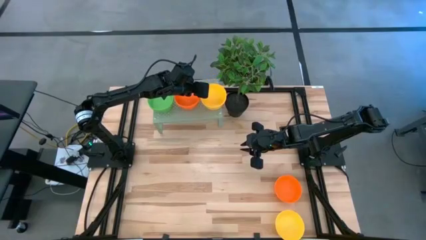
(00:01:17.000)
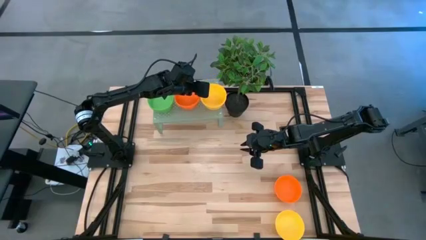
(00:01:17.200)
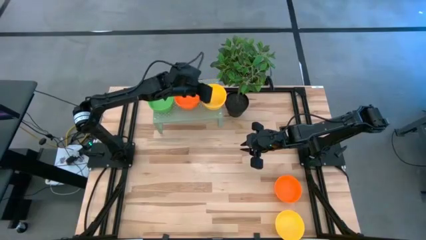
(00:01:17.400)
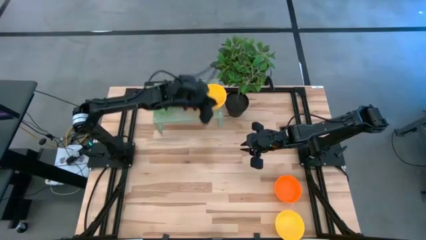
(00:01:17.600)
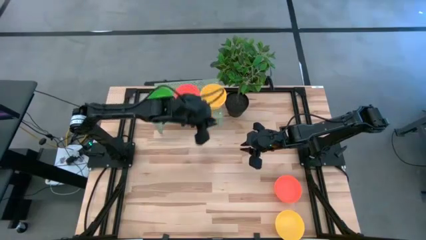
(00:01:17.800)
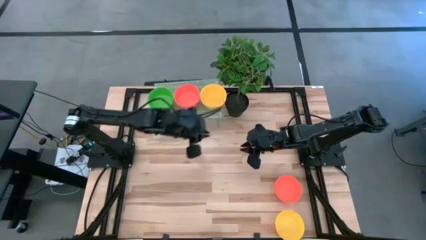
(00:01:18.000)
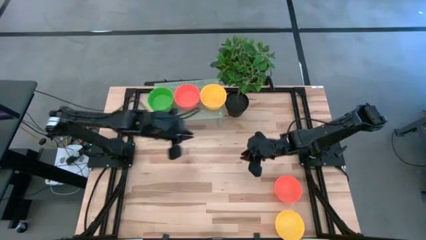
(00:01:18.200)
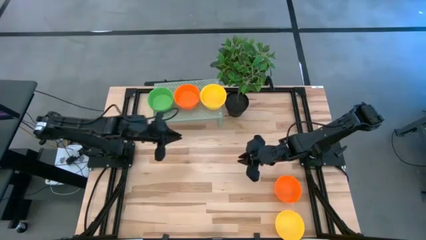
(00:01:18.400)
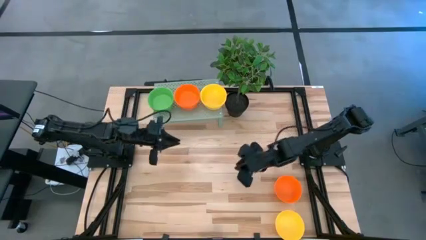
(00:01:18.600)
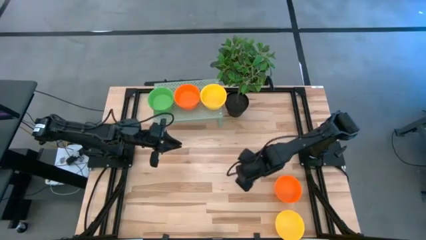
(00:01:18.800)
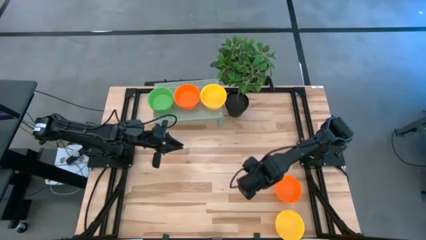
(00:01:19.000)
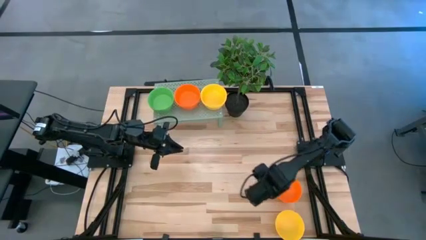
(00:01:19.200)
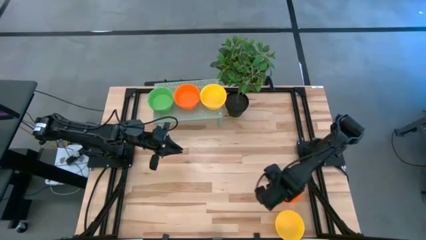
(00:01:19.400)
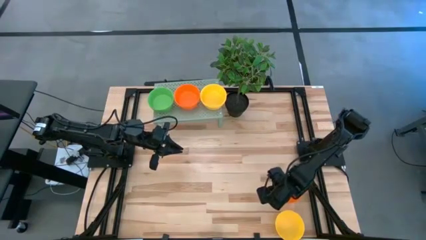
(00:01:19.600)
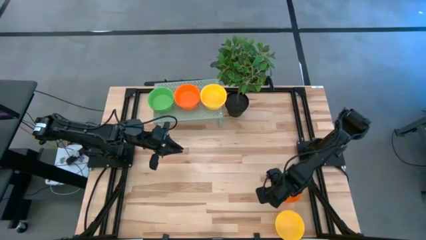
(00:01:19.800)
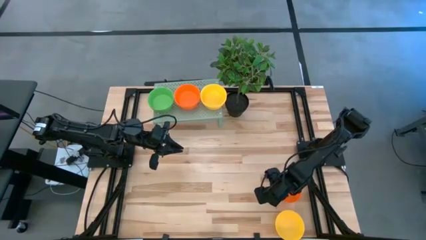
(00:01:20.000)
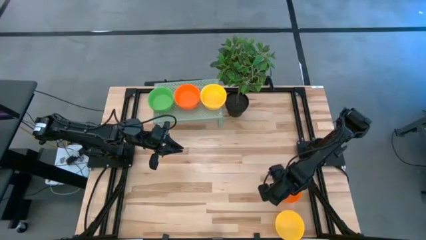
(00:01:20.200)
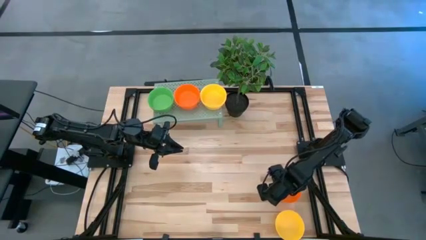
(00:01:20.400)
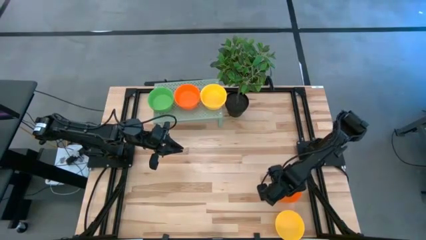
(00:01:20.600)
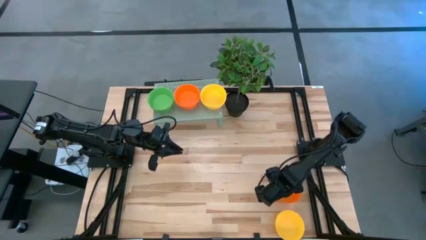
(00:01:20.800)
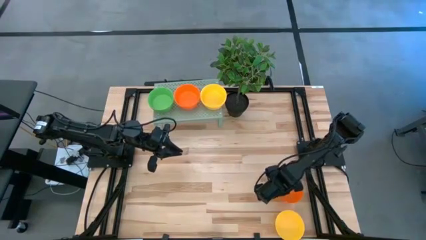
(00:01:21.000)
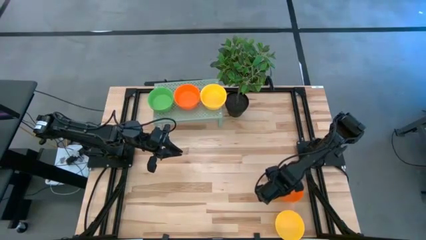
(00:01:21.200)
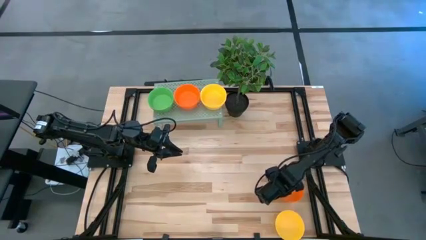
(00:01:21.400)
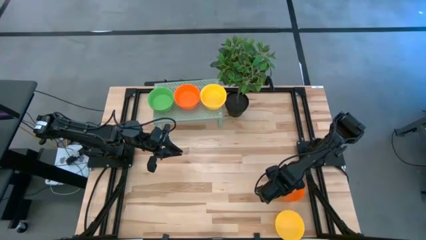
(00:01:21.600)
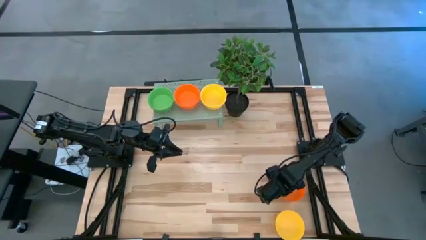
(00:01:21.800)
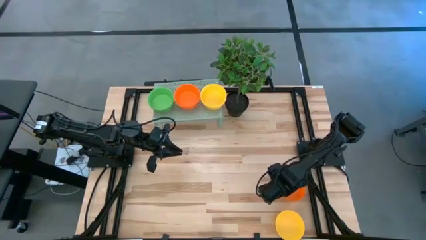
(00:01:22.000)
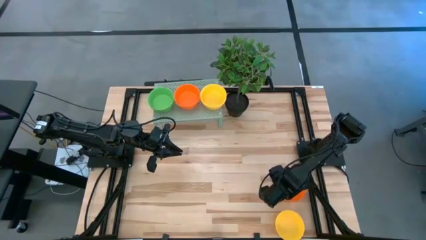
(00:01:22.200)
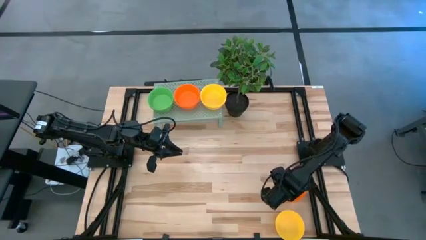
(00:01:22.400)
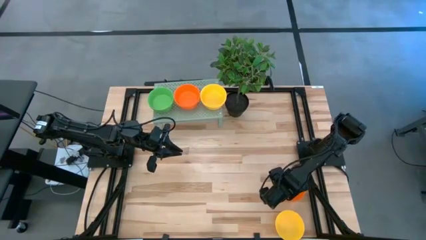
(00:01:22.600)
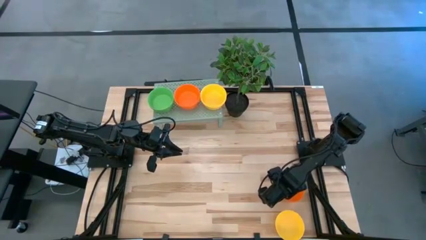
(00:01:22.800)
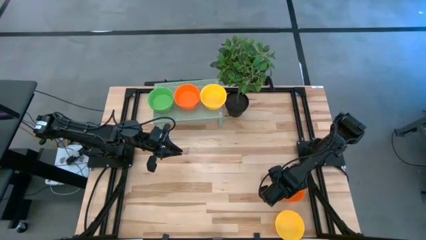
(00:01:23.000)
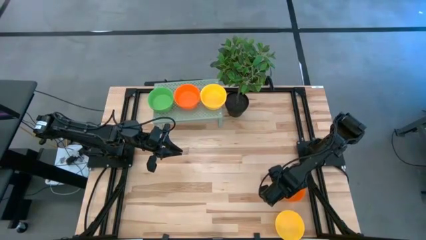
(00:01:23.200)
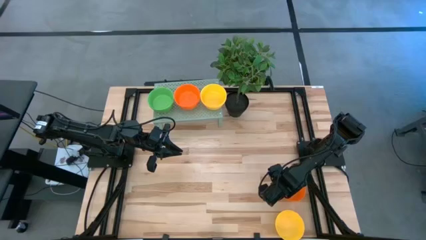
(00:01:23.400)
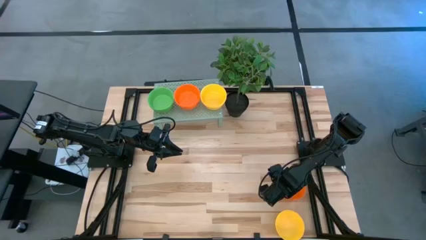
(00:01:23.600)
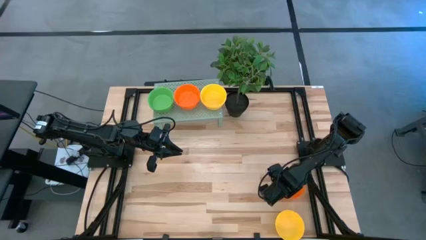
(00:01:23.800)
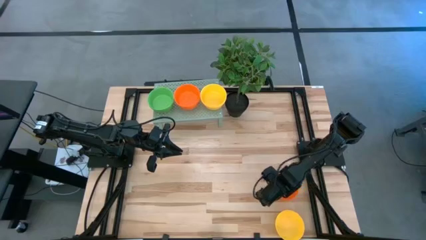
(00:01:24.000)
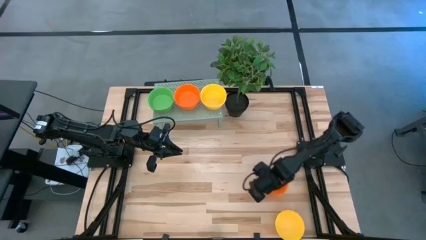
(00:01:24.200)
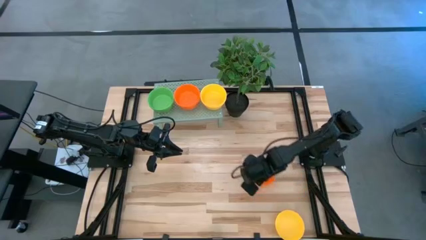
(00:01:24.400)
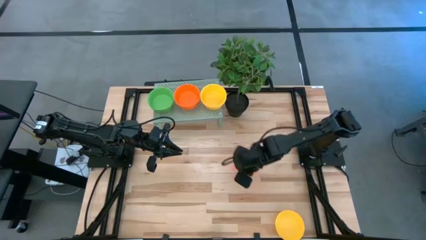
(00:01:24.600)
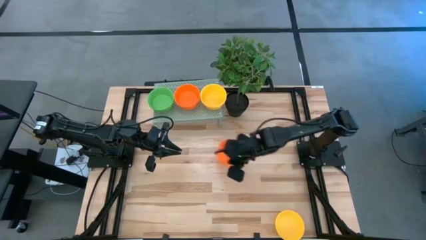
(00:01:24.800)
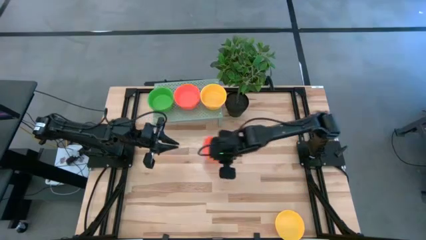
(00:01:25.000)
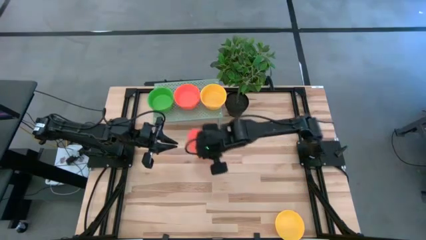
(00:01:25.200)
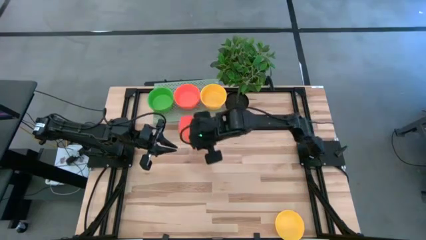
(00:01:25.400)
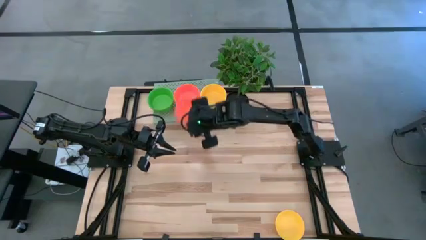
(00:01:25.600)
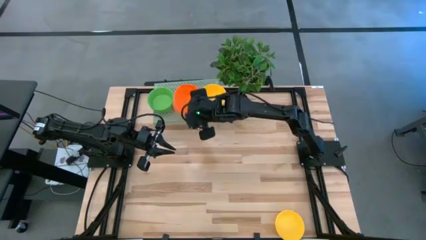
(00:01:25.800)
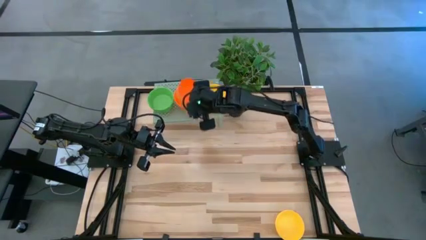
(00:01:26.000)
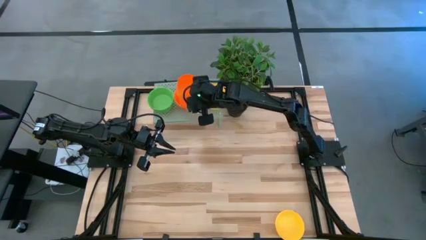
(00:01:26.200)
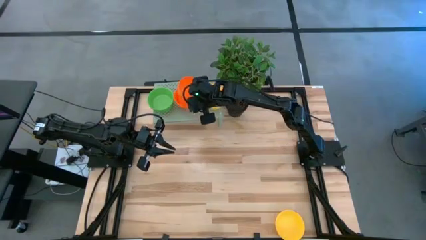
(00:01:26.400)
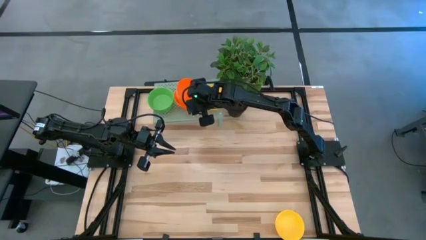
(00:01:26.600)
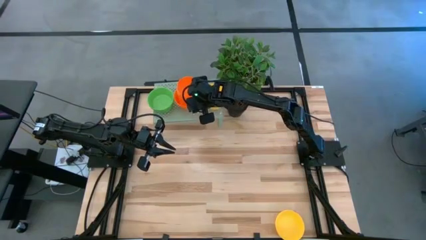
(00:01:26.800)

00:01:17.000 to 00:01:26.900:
Task: Pick & Place Mini bowls
Stack the orange bowl on the orange bowls on the shelf

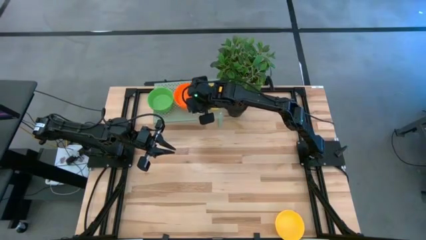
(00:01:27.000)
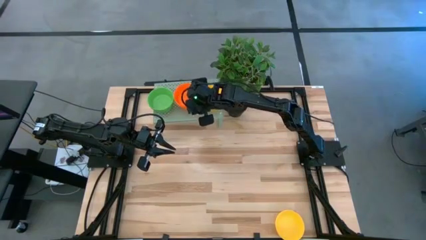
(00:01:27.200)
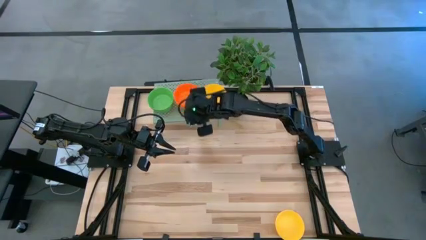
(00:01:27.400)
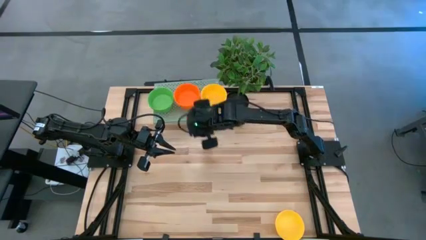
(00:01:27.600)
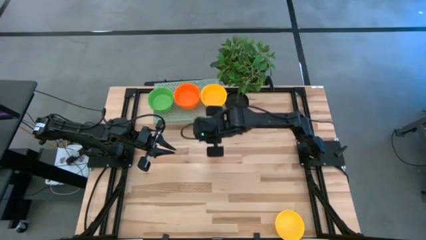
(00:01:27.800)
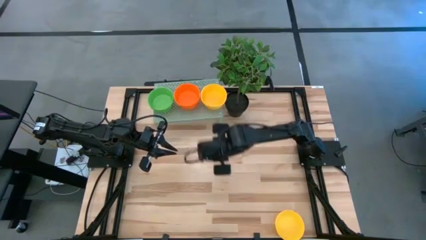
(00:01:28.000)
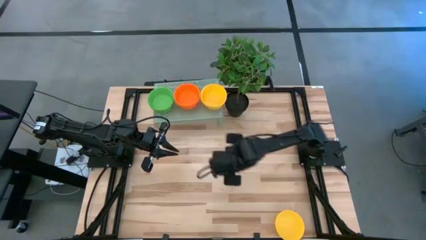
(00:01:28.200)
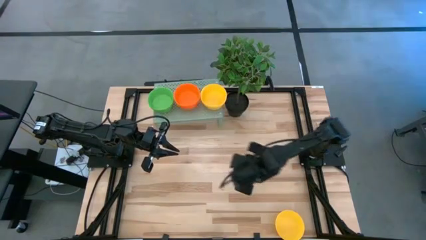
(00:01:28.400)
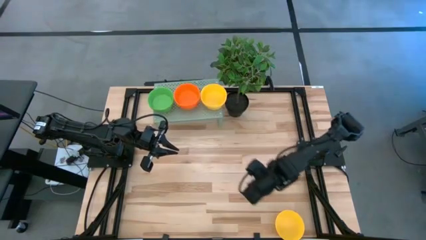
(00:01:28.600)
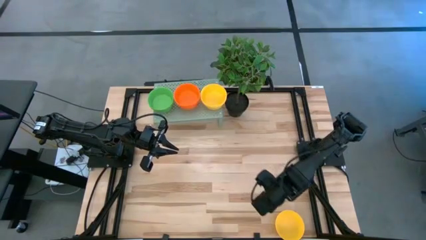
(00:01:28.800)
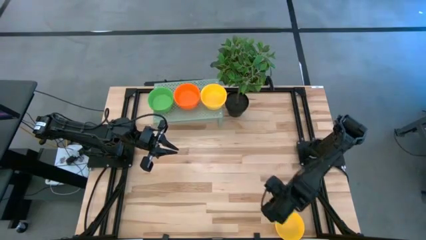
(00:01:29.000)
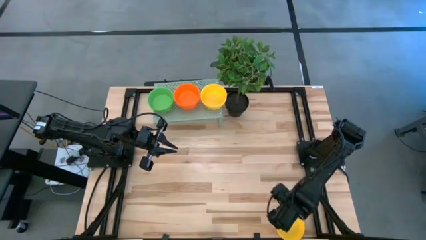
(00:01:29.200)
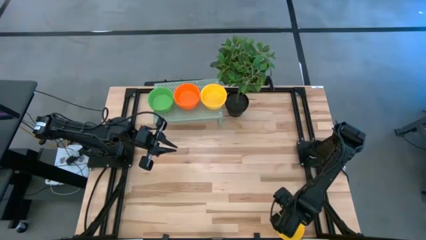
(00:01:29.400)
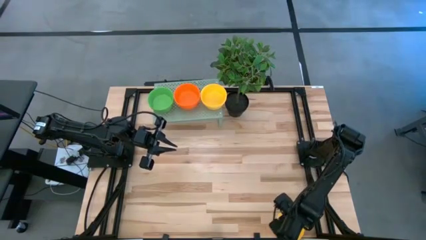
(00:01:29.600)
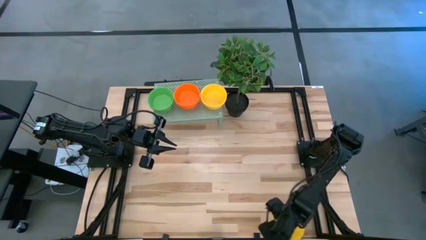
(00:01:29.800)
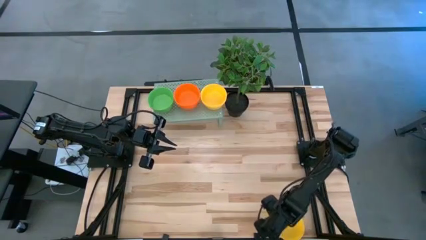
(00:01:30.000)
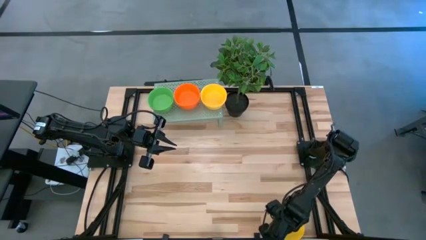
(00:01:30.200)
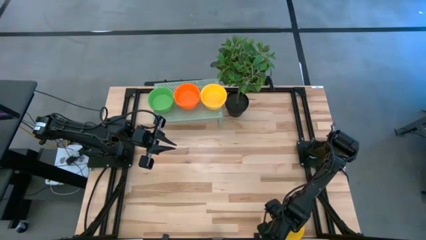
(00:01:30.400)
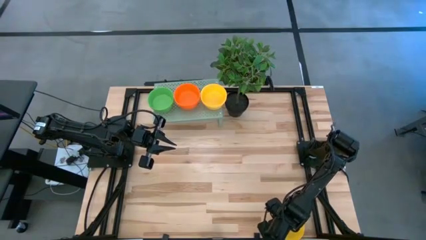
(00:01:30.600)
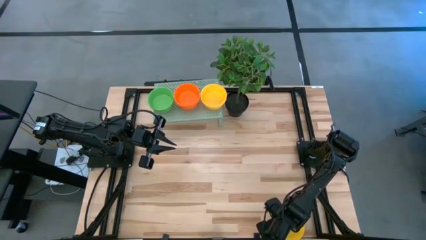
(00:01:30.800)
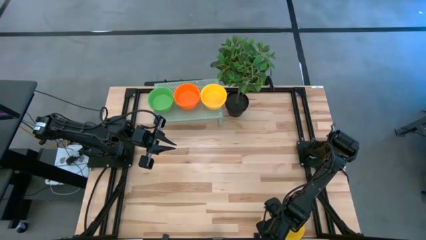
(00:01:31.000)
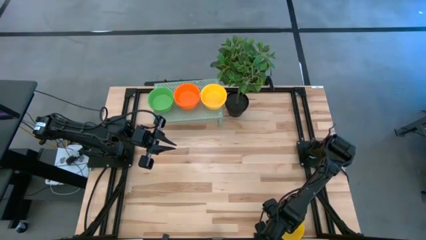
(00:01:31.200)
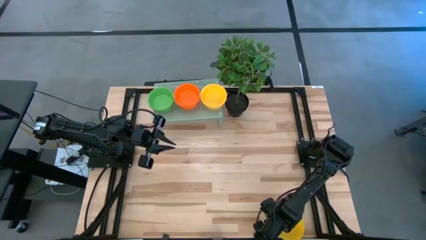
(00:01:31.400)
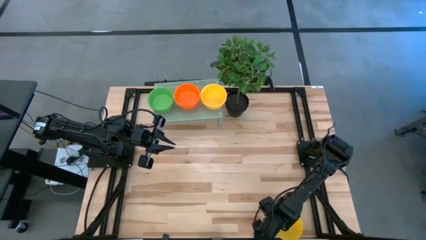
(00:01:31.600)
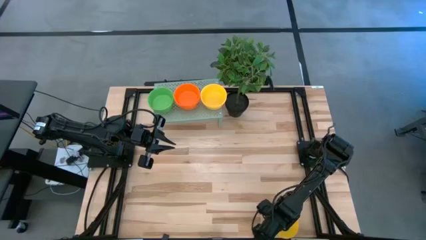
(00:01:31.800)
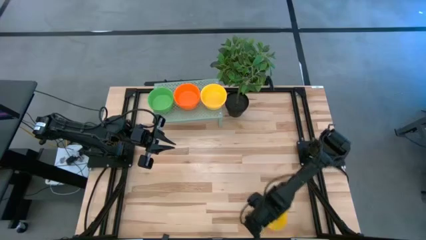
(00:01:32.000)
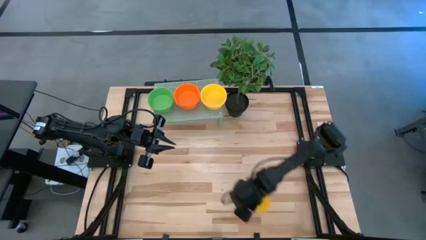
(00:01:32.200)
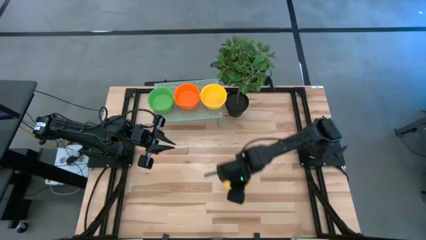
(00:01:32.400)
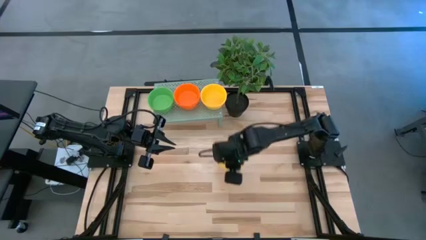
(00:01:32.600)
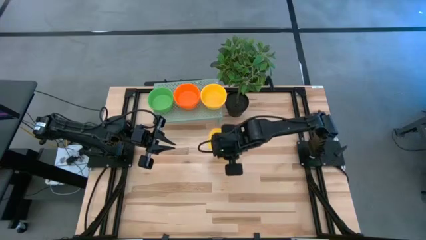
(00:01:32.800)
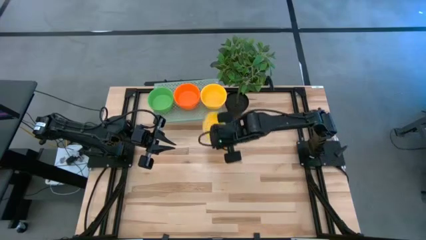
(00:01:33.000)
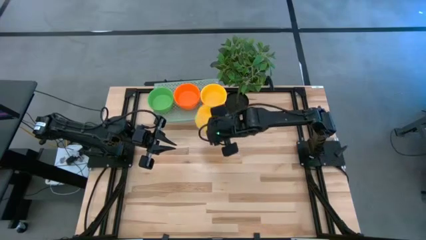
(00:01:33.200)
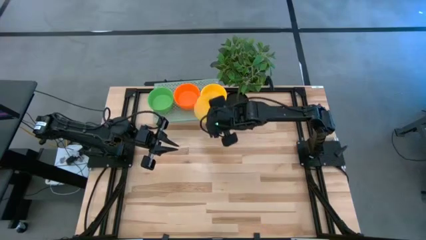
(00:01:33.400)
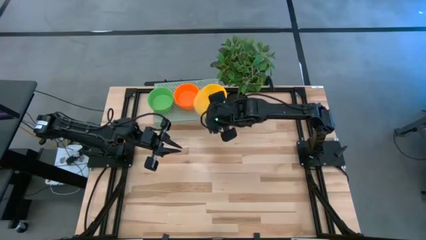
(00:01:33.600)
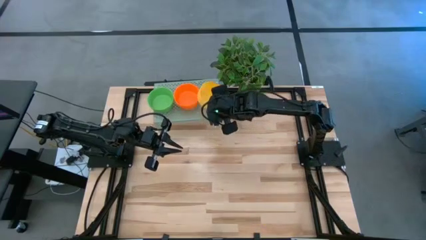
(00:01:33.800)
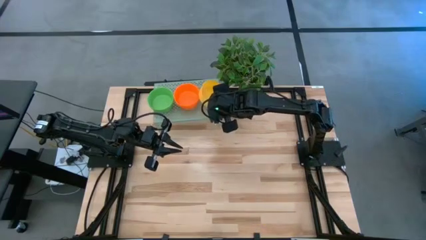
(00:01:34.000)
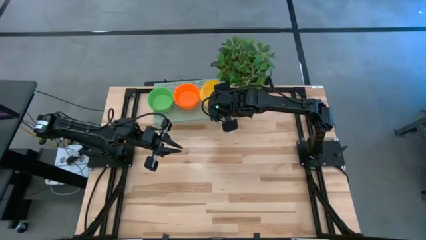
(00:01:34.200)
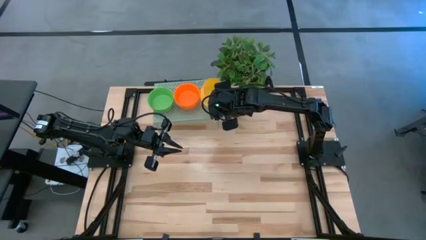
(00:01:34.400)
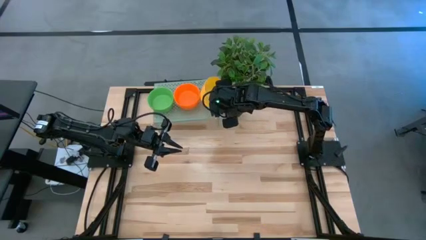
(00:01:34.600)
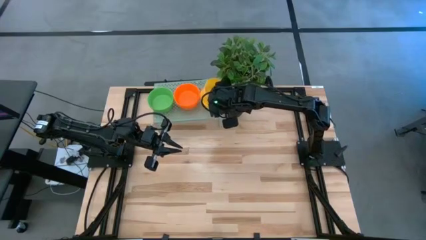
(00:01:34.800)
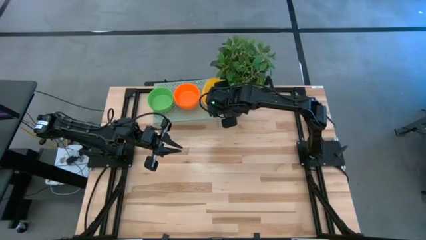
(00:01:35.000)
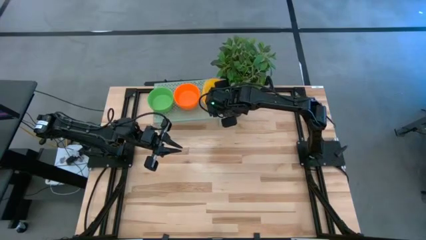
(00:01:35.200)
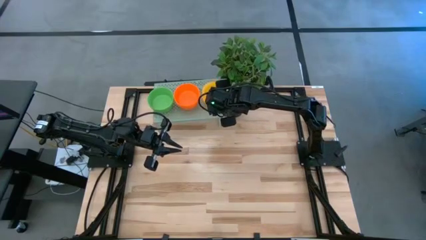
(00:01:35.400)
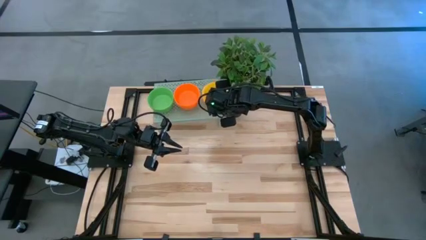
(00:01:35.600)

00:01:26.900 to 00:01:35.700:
Stack the yellow bowl on the yellow bowls on the shelf
